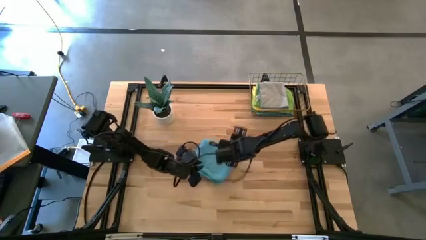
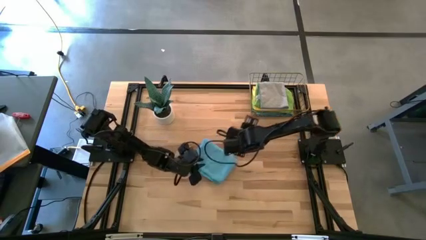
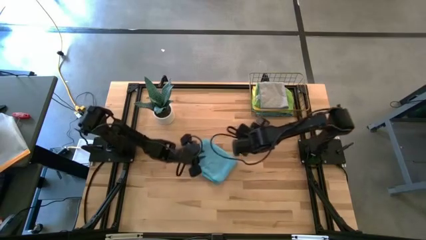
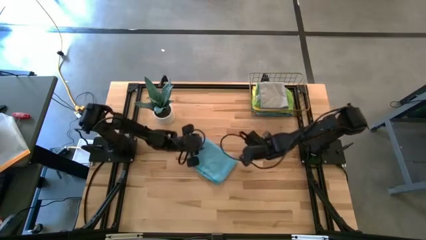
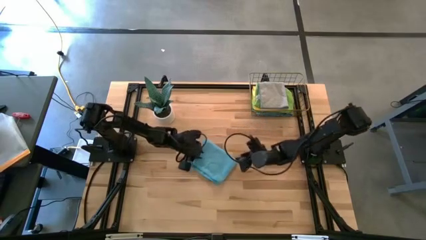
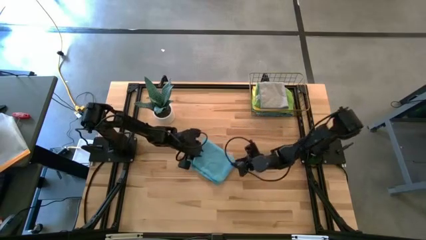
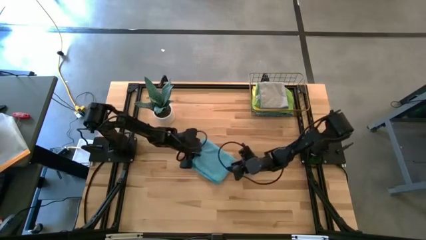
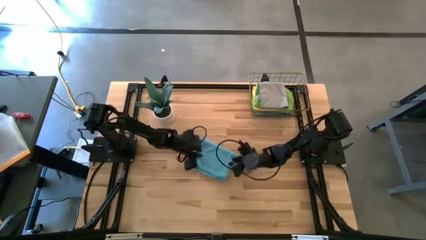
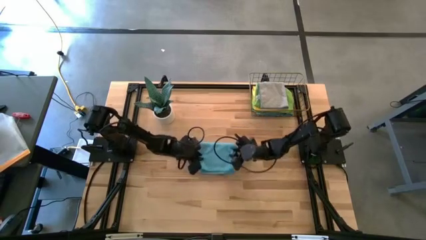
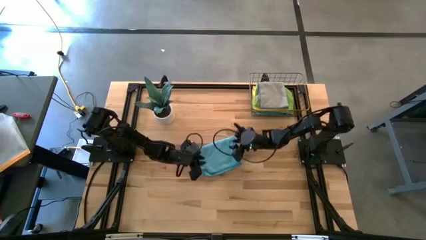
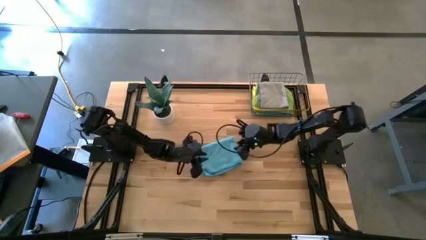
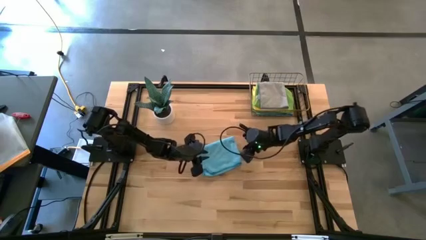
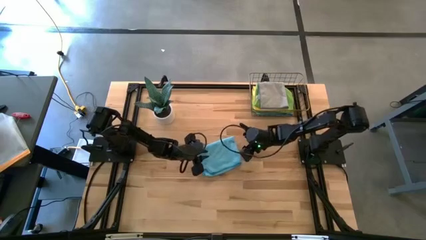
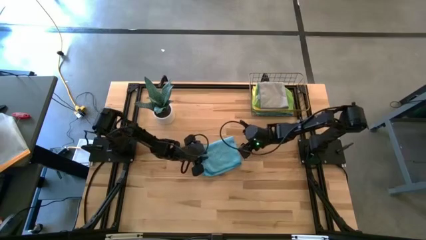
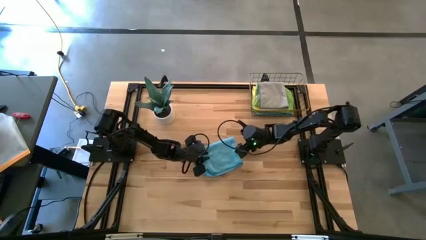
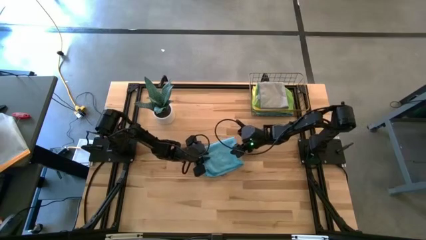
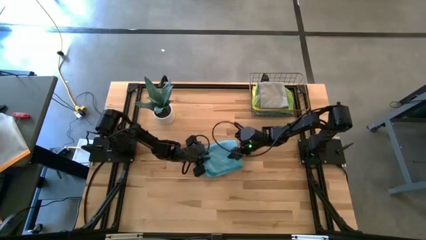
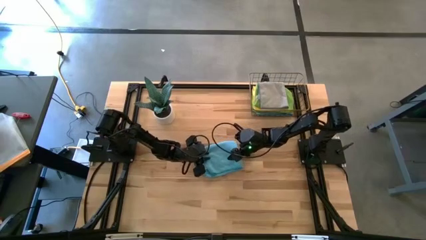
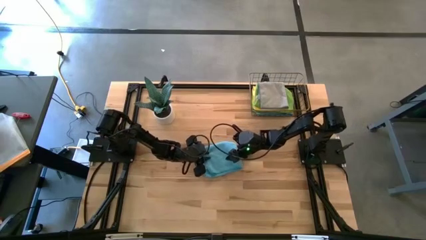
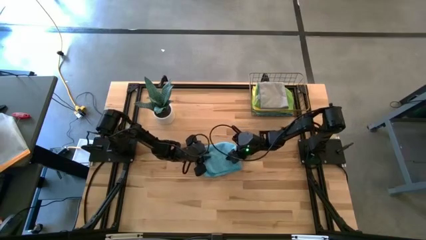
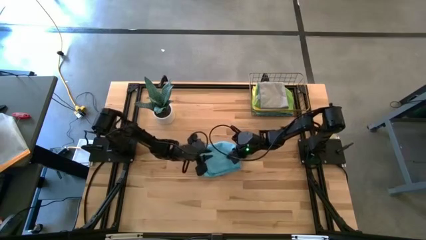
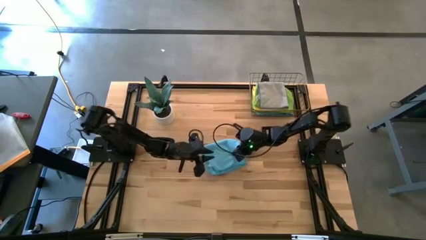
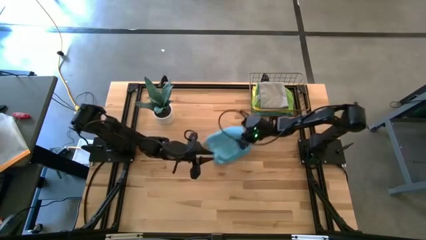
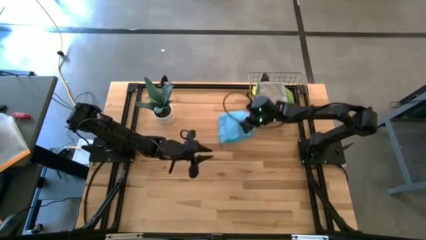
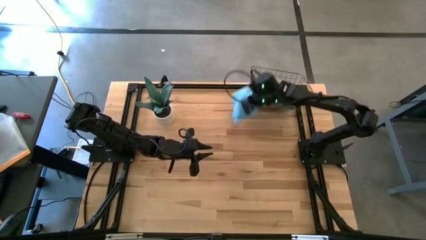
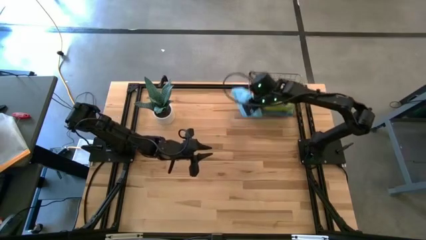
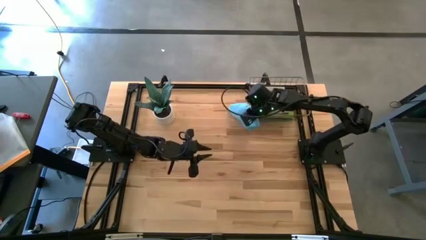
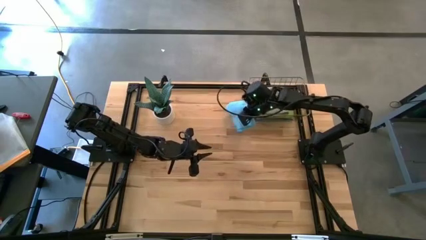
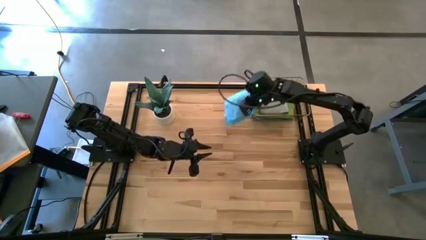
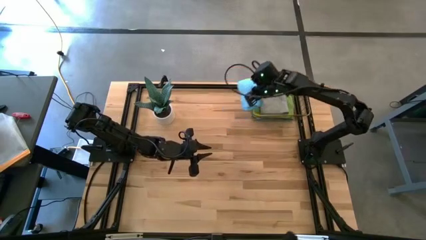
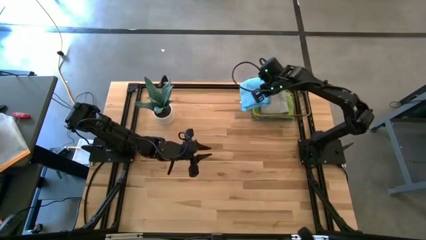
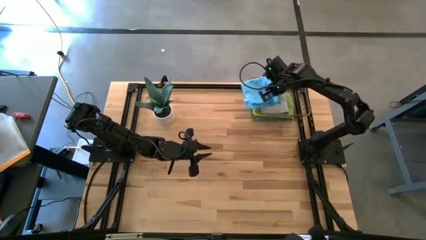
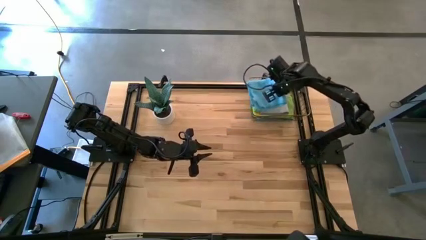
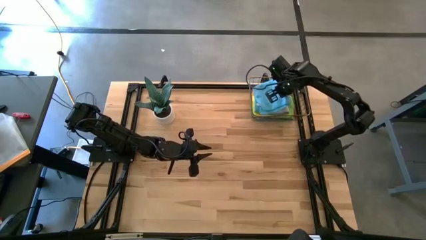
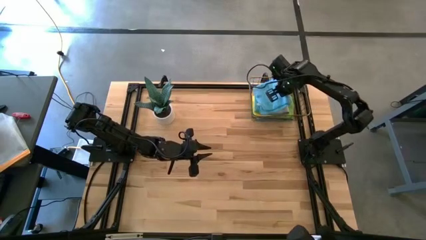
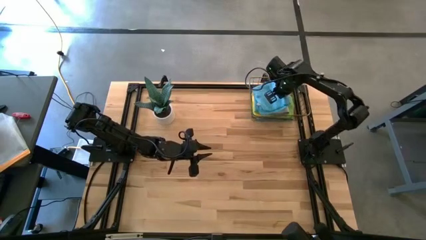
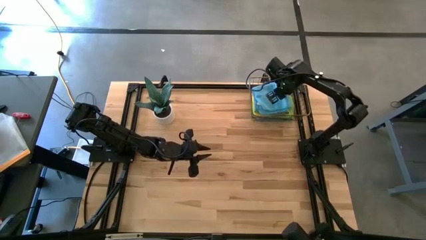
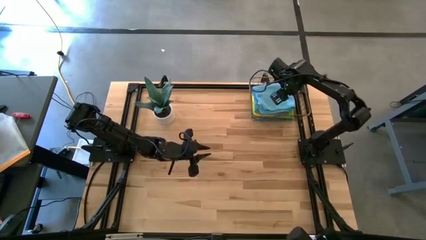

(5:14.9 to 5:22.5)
Task: Fold microfiber towels
Put the blue towel into the wire basket

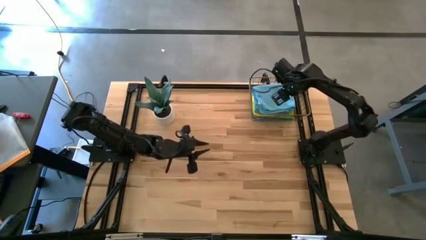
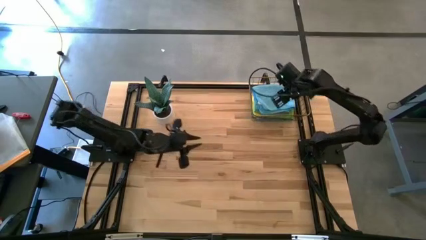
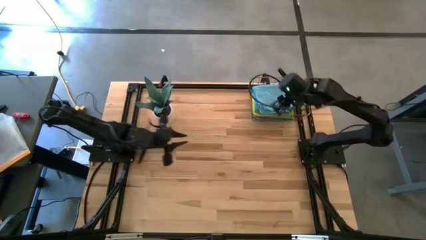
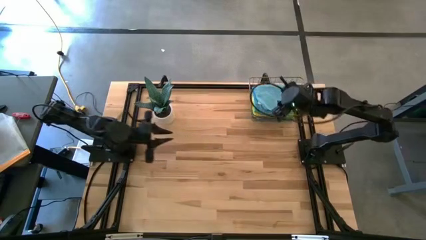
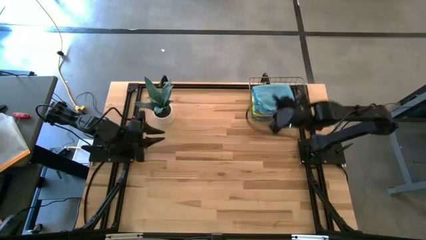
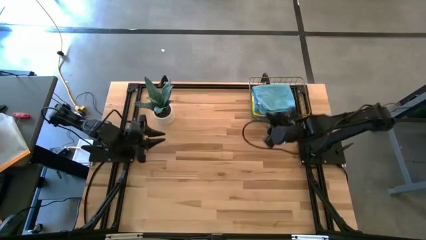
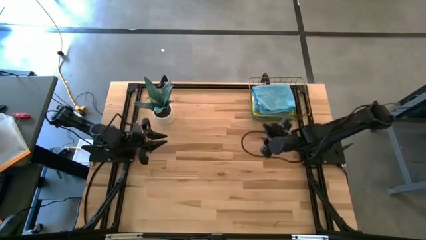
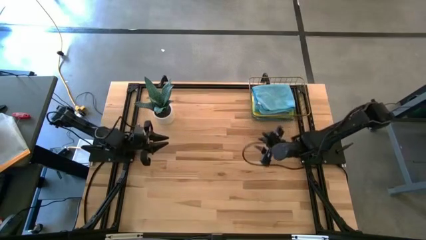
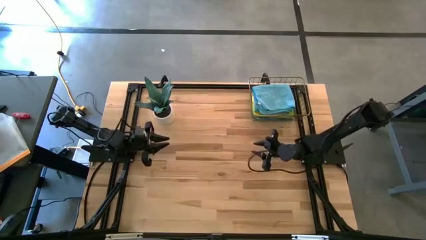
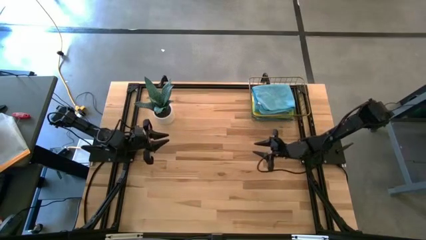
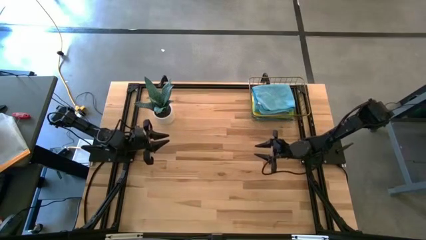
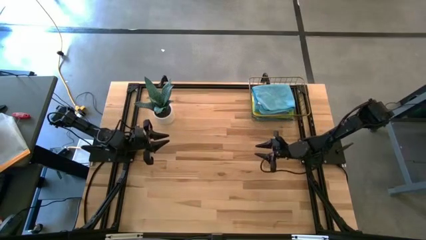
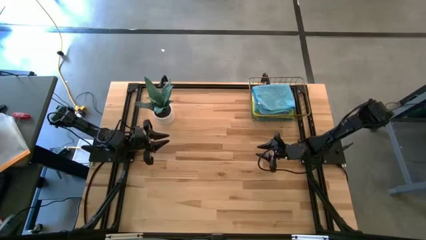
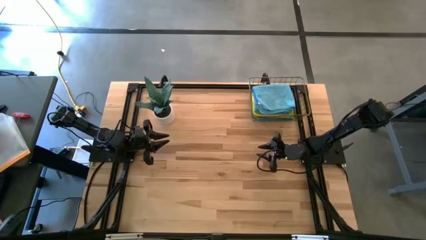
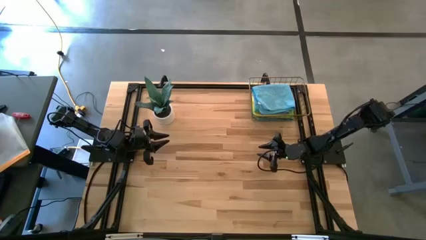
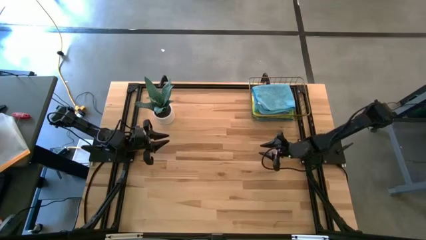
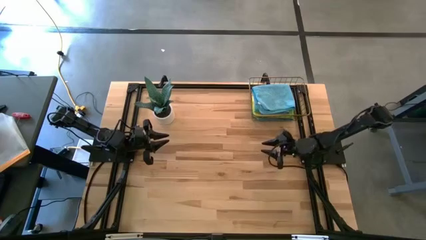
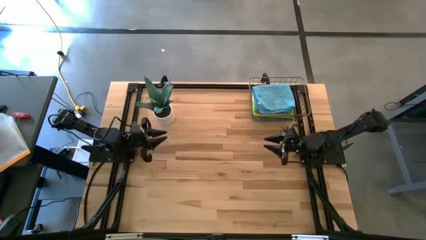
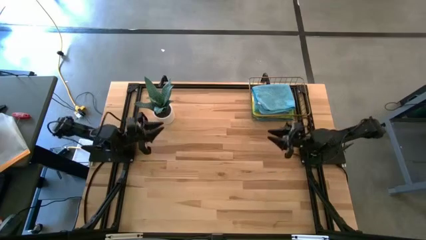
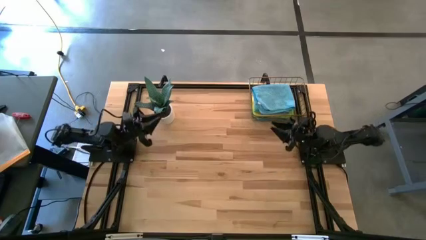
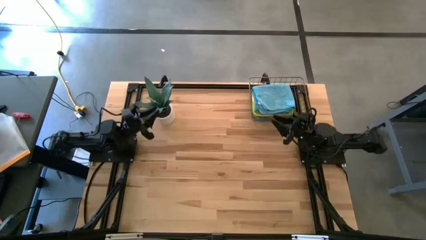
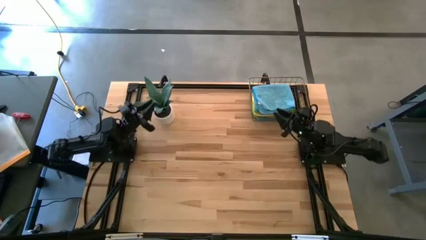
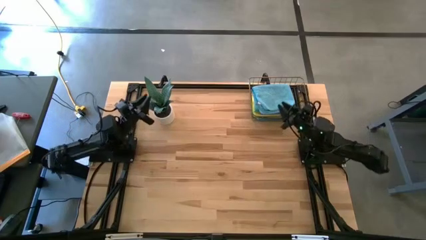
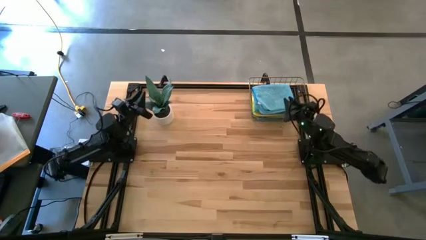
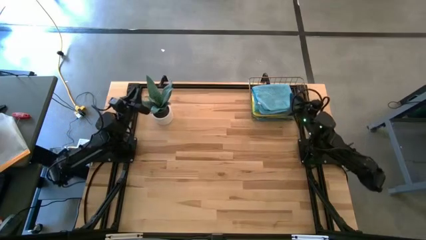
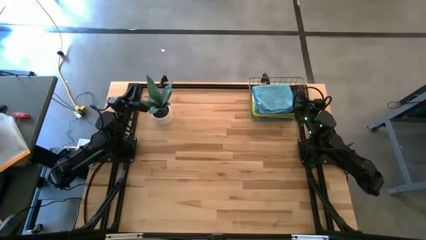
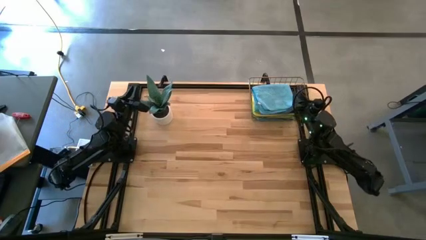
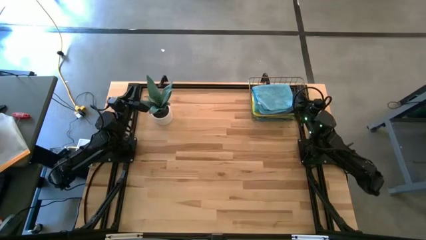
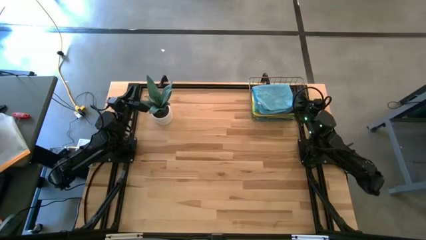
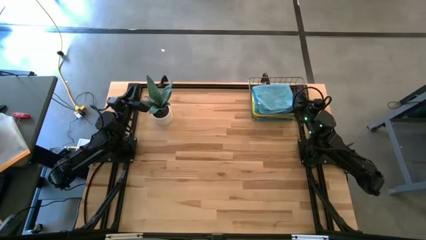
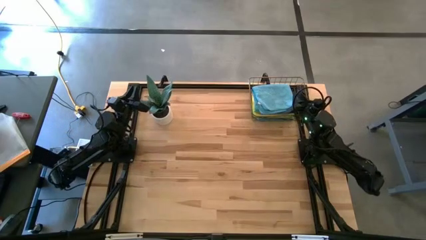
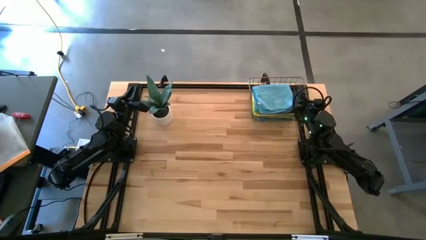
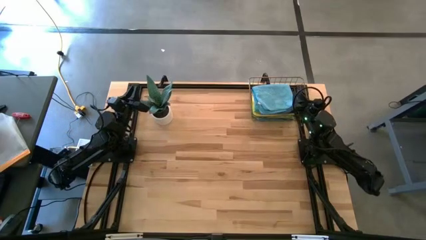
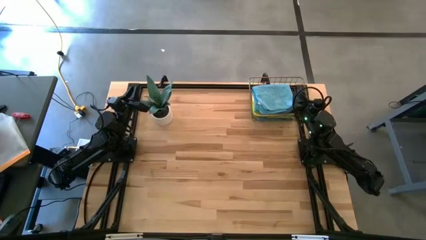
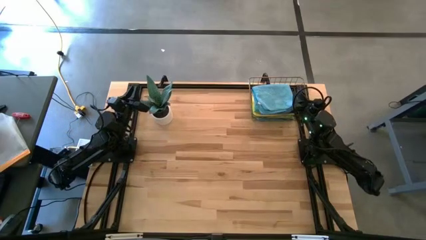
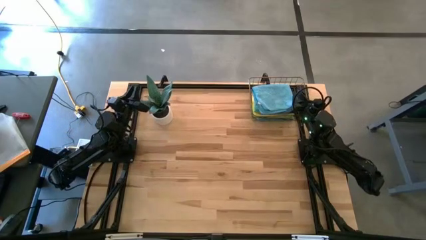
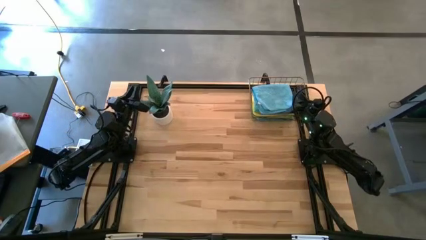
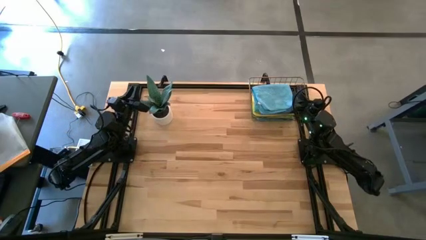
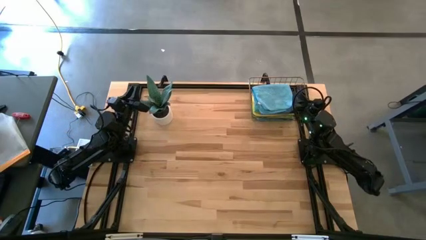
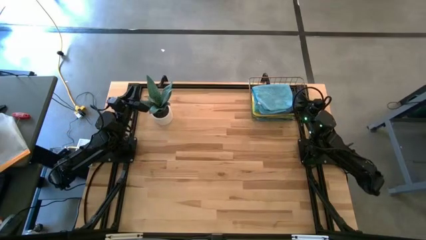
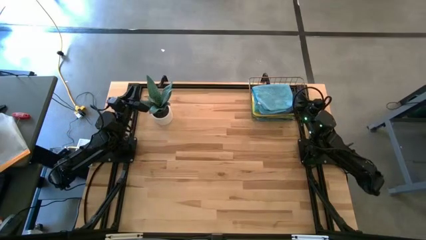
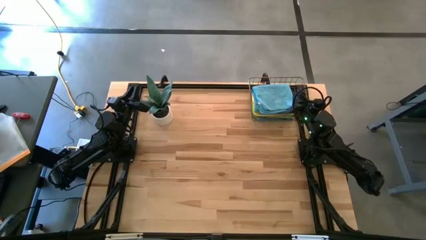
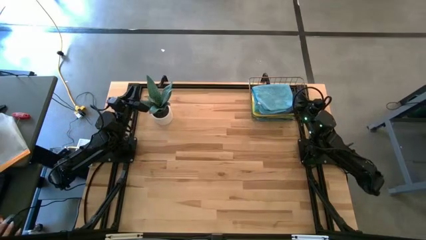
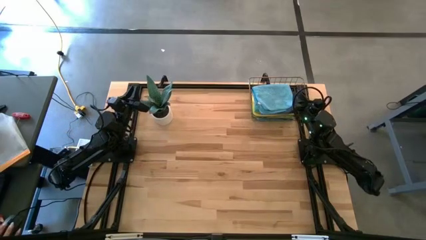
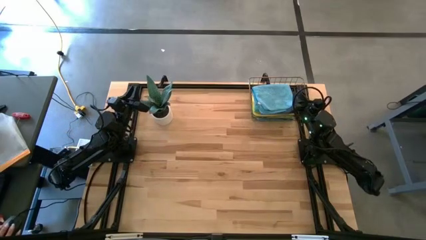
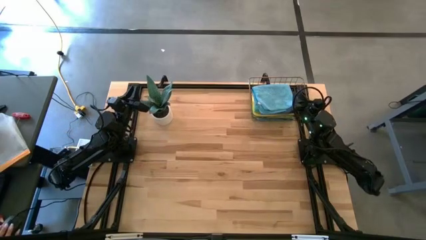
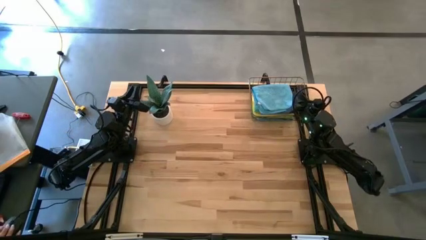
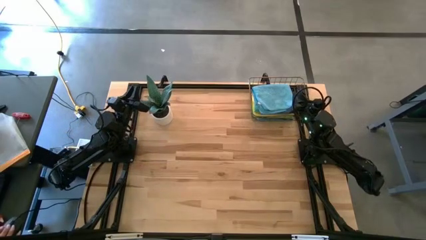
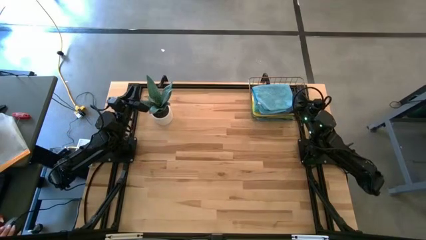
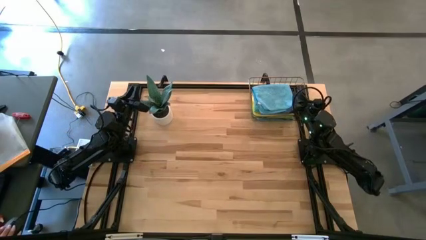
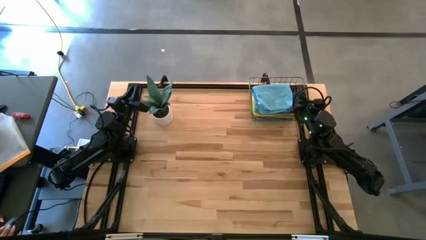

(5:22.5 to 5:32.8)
Return to Home Position
